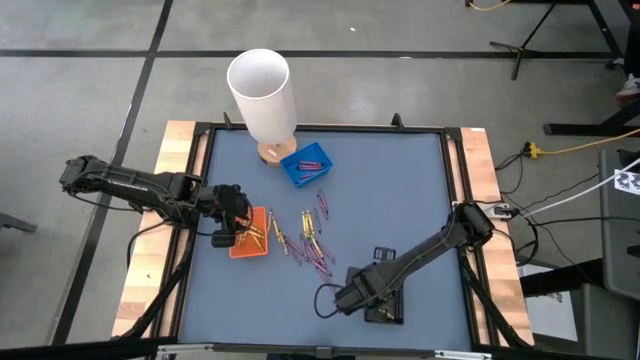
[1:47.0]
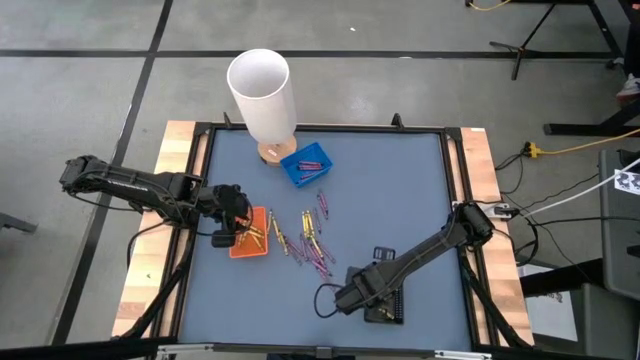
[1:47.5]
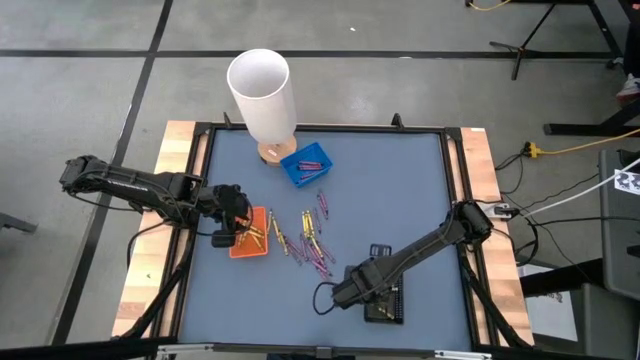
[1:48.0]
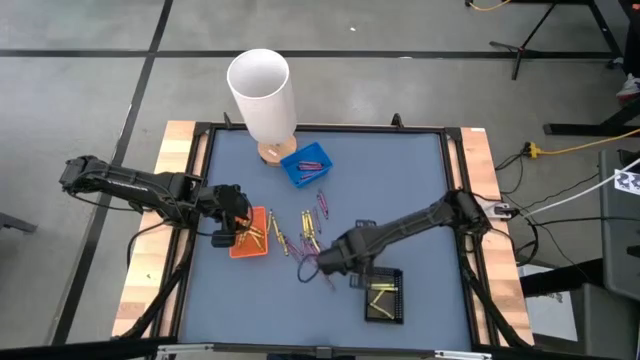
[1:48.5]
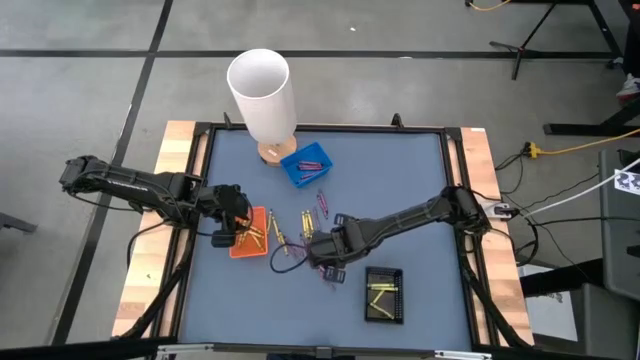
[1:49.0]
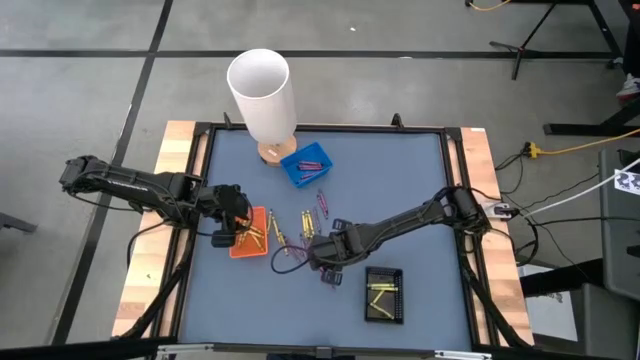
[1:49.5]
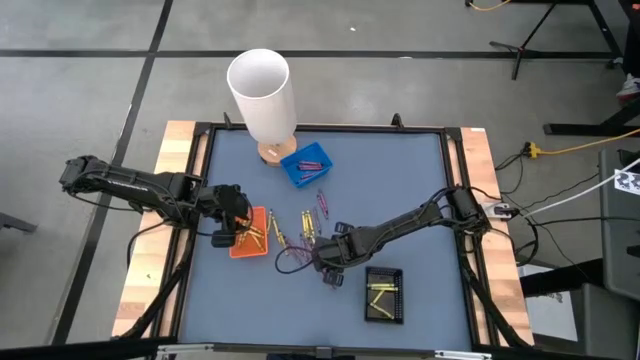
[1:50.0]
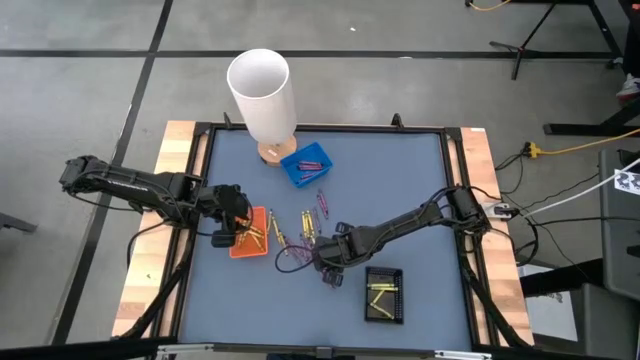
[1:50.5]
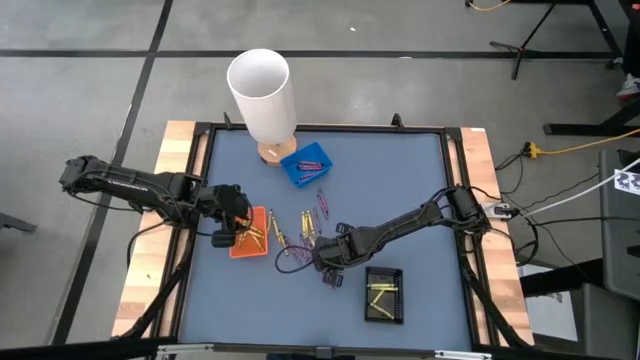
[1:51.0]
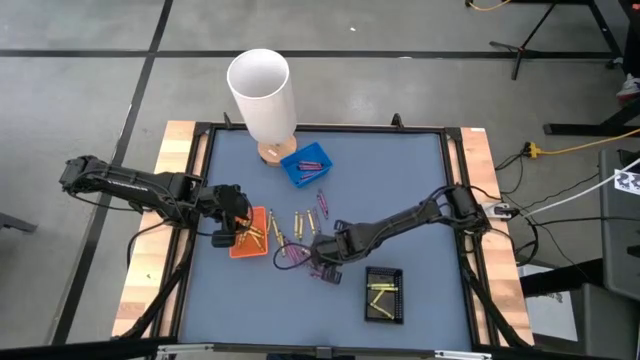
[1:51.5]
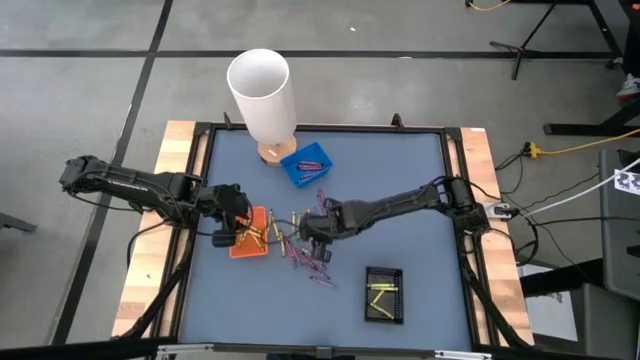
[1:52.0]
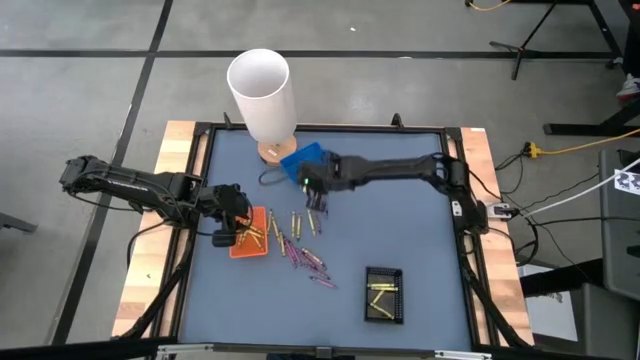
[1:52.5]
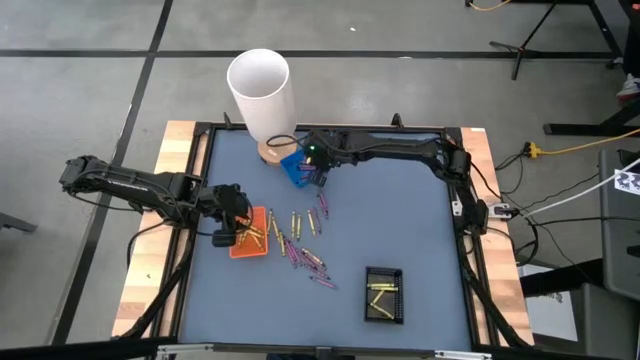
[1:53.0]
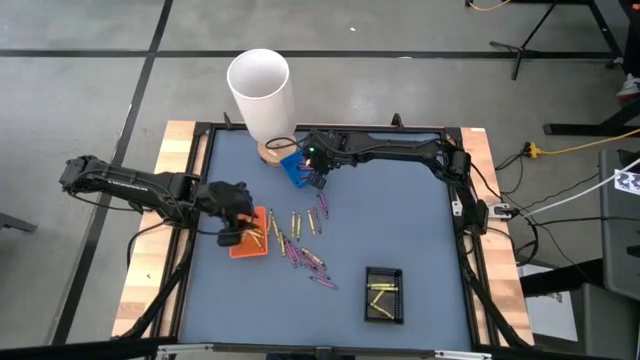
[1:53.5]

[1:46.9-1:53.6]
Task: Sort crayons
Put the violet crayon into the blue bin

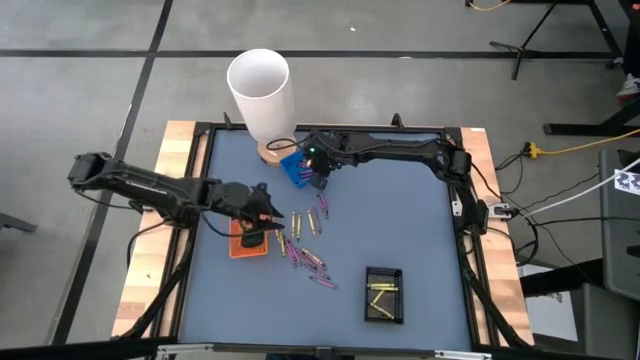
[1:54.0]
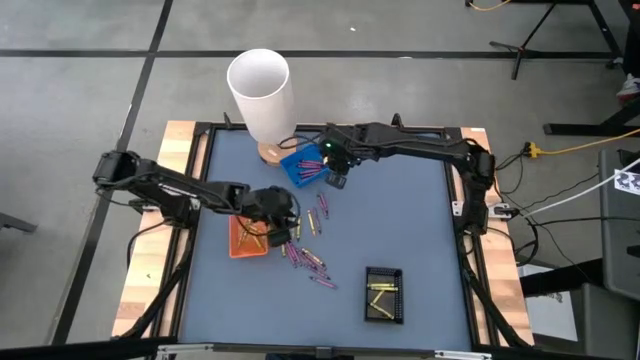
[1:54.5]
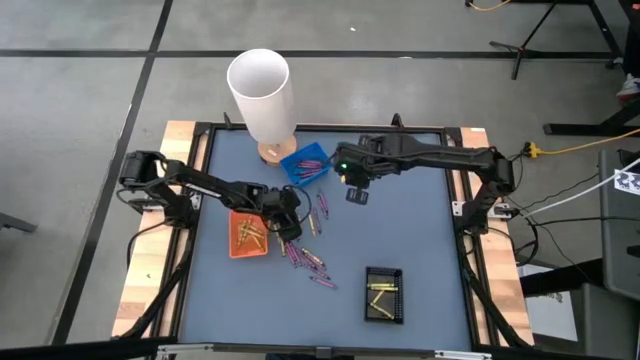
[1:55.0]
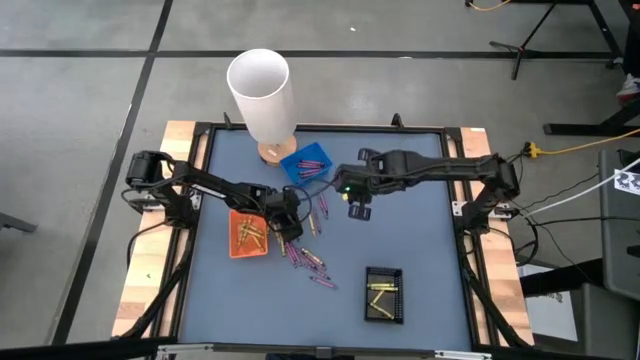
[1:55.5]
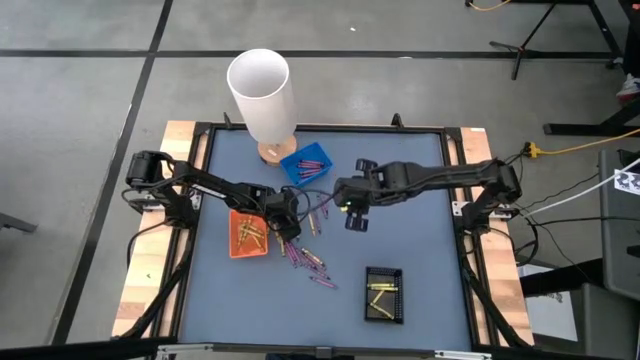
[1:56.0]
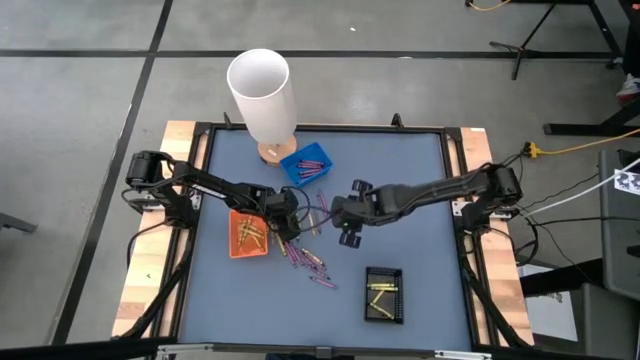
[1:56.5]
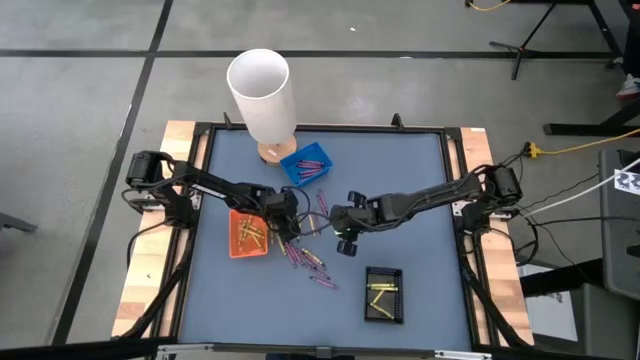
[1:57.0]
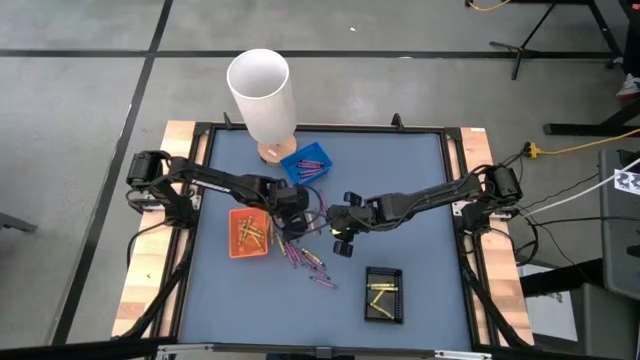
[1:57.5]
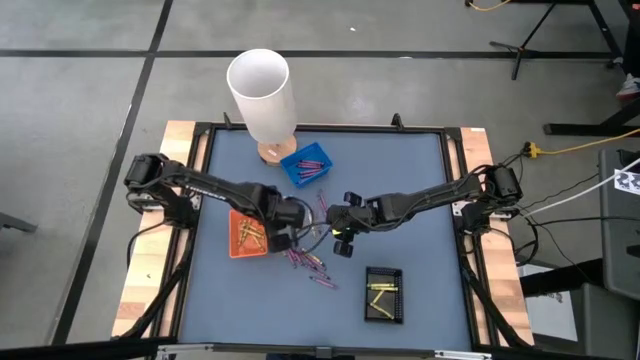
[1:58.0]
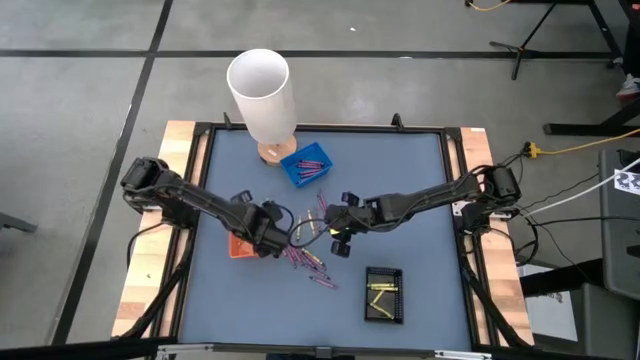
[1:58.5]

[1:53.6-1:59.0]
Put the yellow crayon into the orange bin

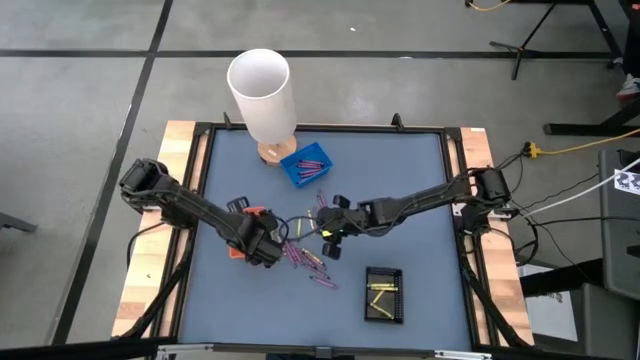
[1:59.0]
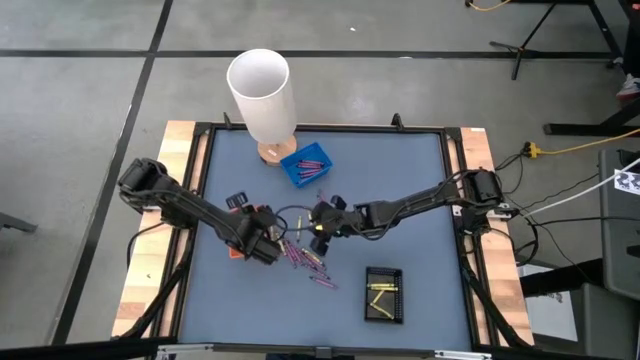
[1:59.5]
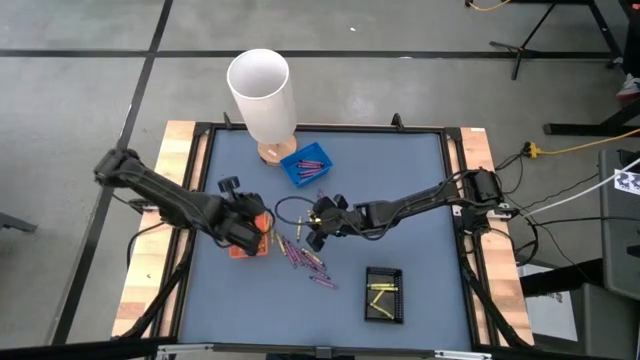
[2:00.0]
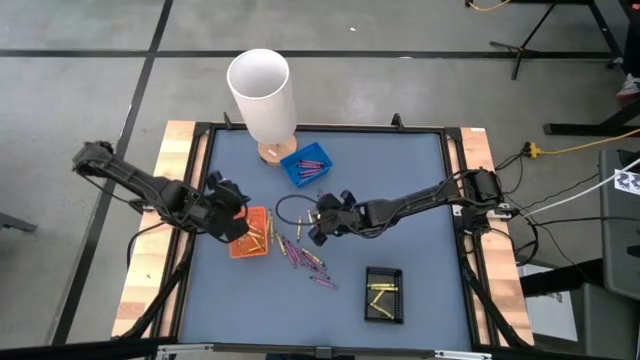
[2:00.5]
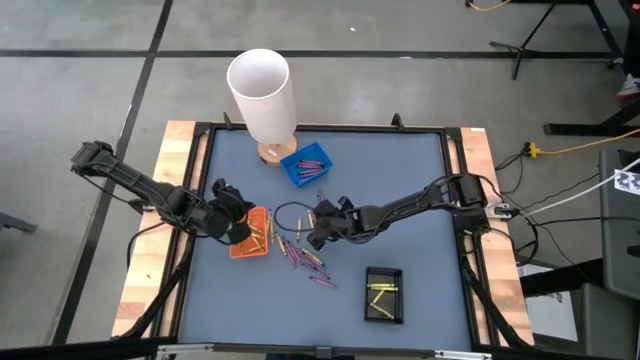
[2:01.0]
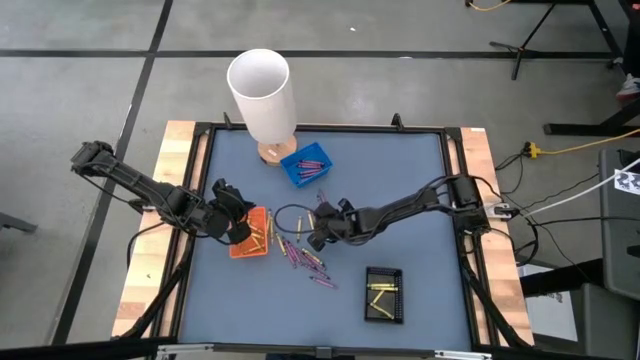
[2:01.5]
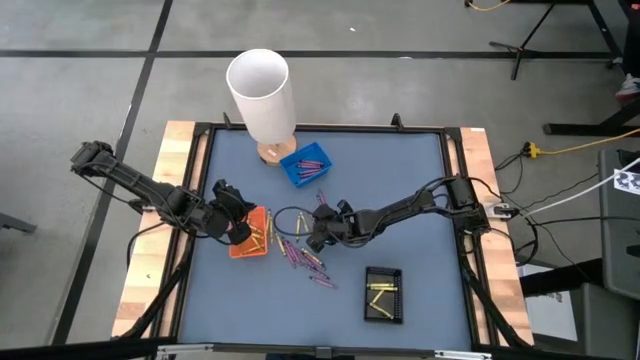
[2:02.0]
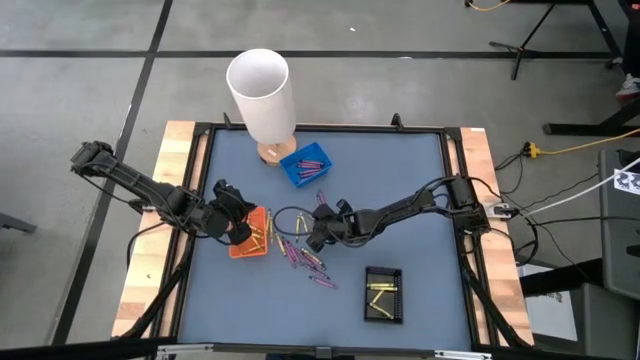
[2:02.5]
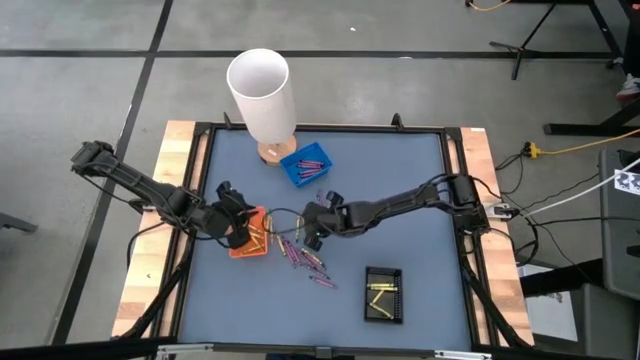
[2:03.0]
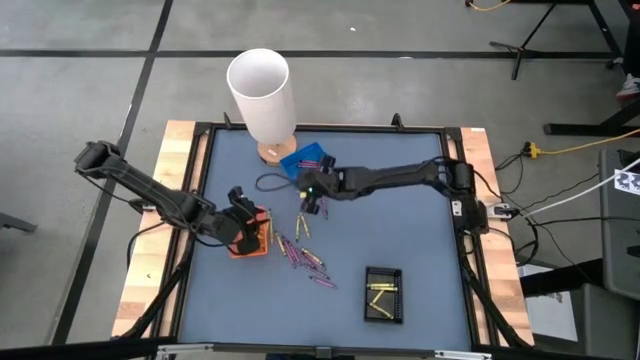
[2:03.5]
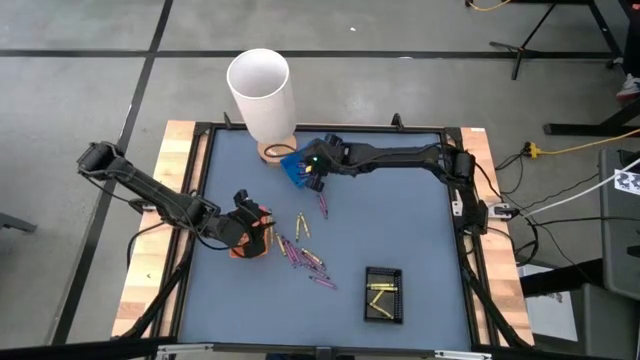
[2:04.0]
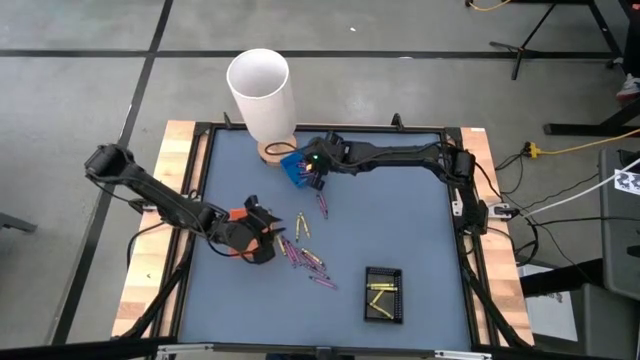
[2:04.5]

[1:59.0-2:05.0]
Put the violet crayon into the blue bin

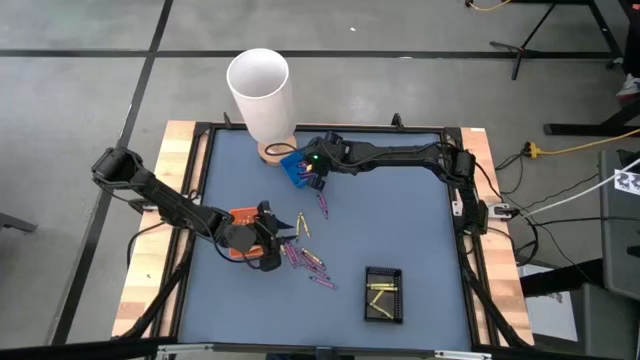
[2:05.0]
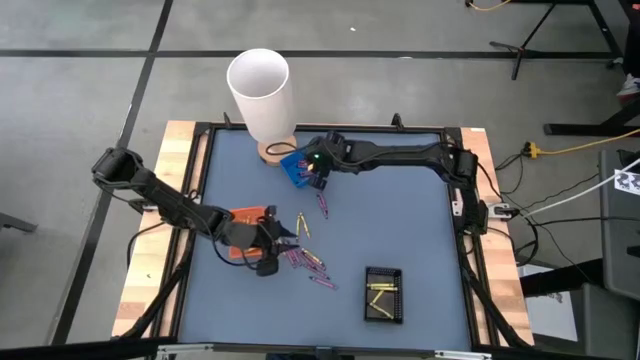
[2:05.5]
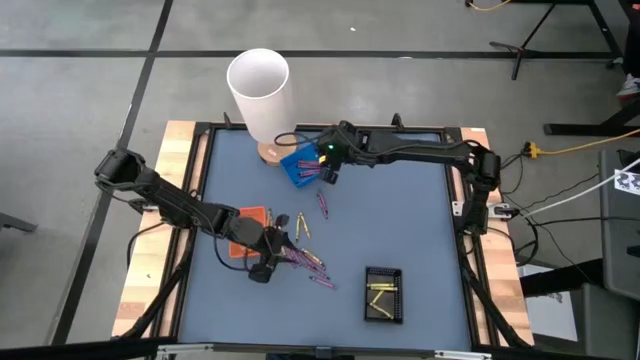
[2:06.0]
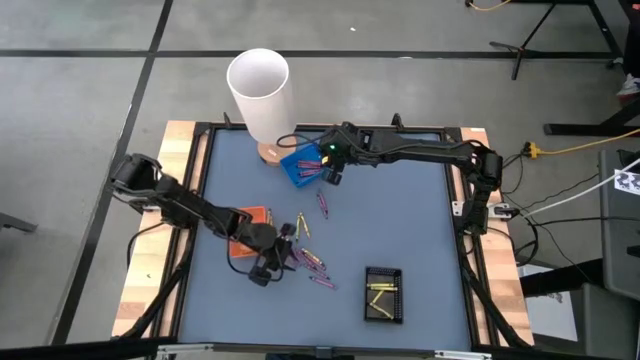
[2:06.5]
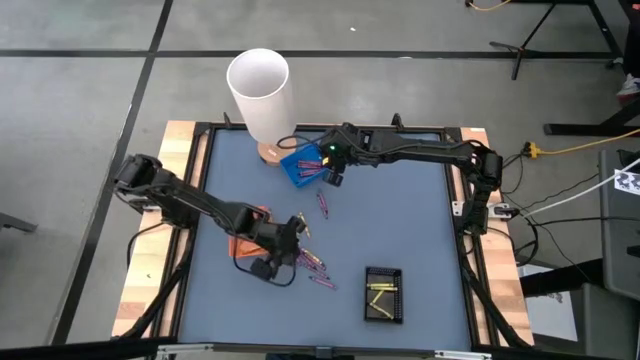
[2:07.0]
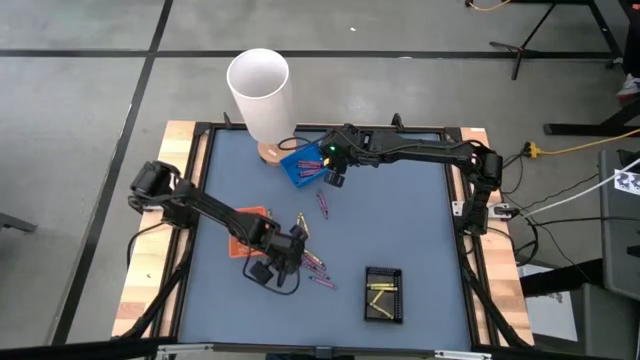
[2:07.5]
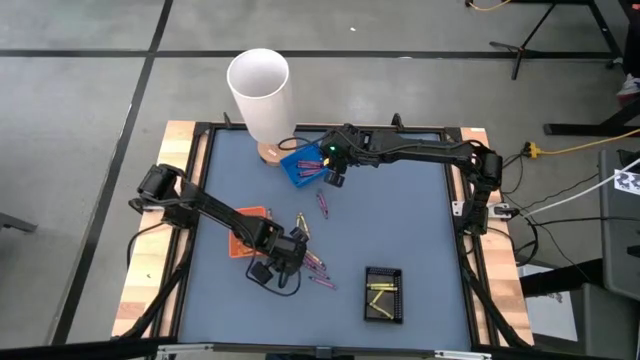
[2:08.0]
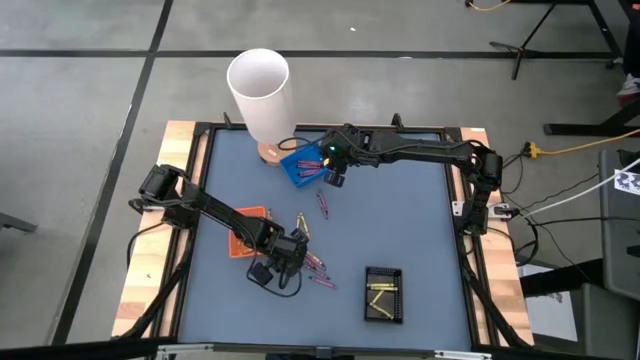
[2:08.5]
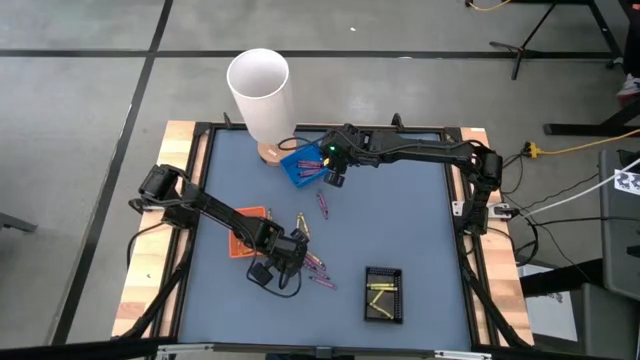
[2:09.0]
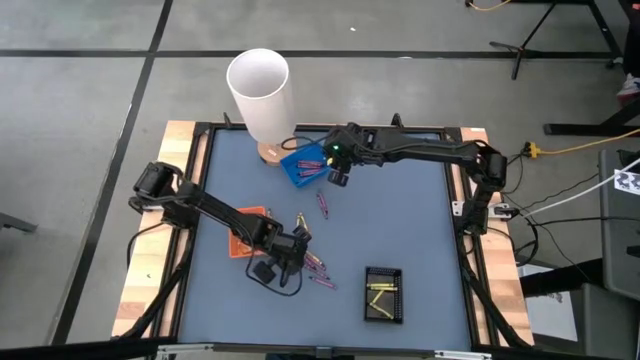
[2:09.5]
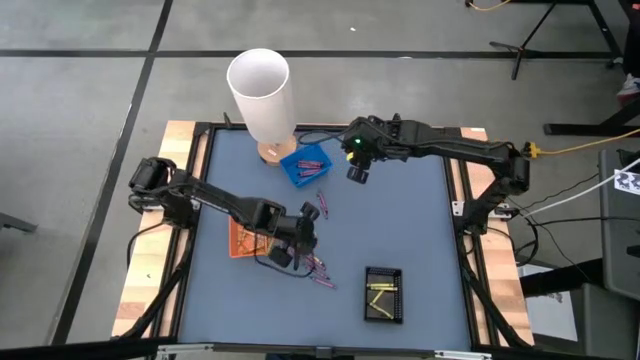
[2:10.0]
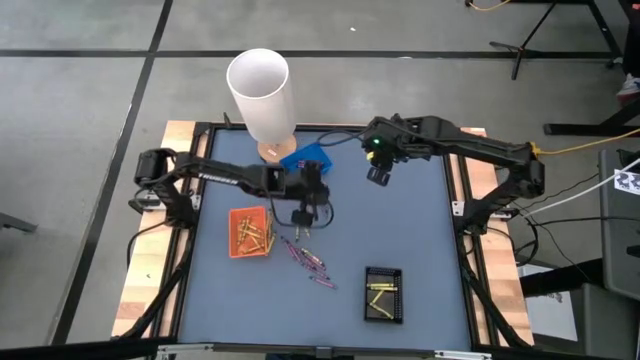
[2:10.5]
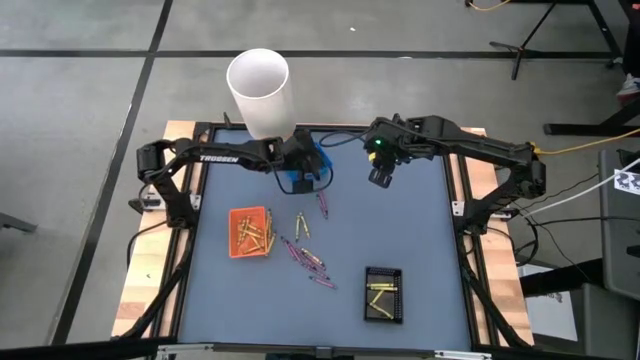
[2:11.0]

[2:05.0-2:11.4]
Put the violet crayon into the blue bin
